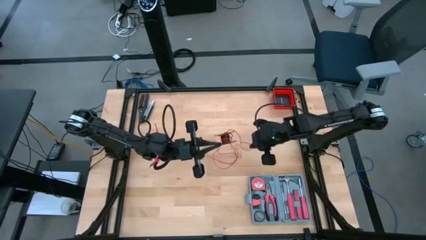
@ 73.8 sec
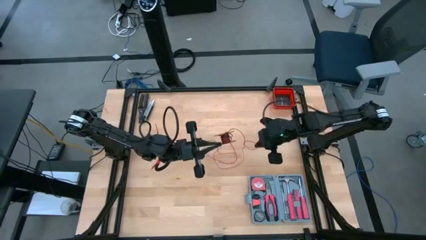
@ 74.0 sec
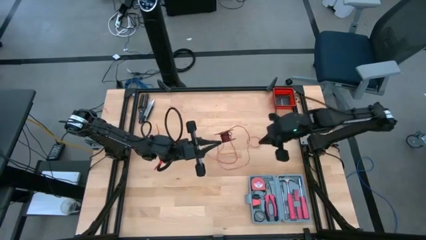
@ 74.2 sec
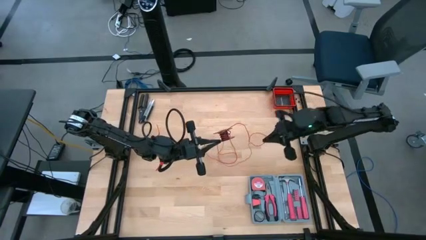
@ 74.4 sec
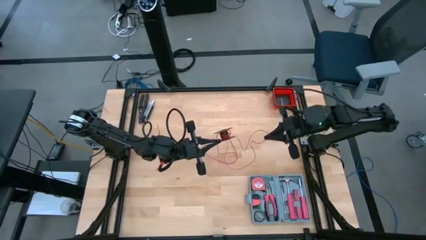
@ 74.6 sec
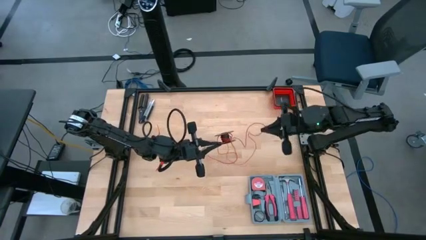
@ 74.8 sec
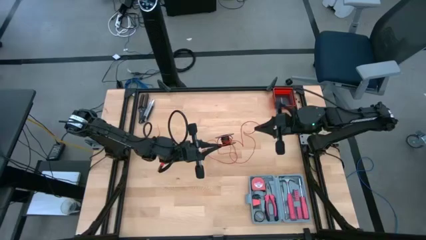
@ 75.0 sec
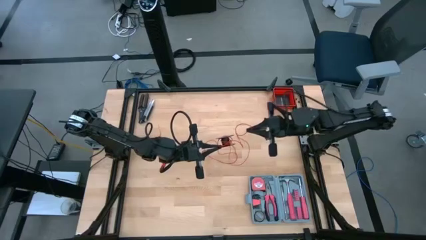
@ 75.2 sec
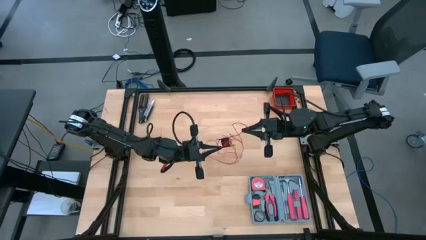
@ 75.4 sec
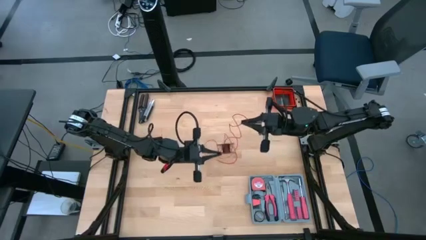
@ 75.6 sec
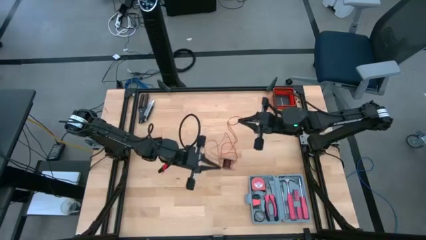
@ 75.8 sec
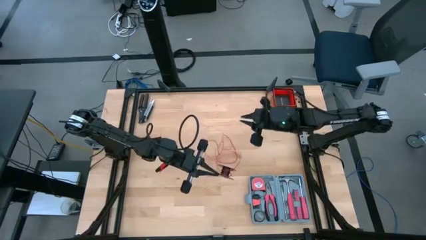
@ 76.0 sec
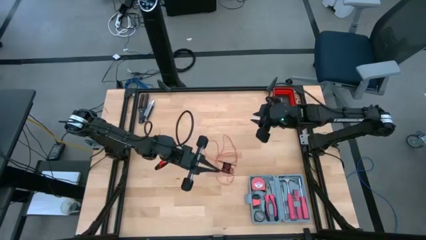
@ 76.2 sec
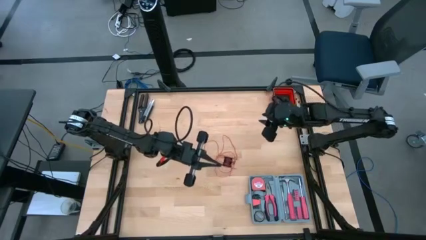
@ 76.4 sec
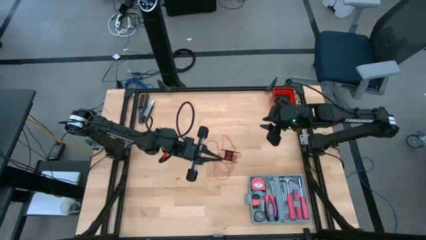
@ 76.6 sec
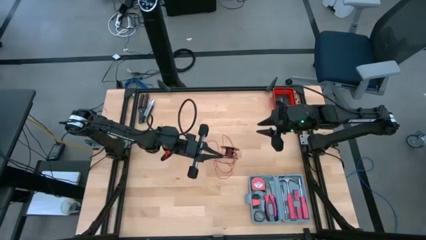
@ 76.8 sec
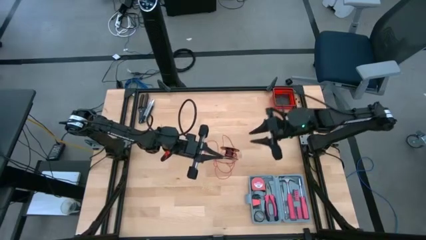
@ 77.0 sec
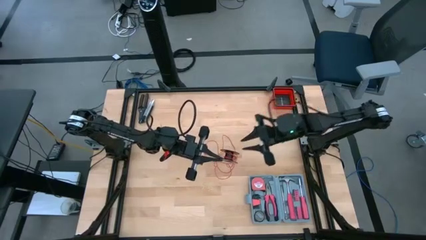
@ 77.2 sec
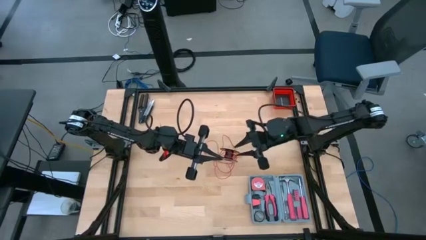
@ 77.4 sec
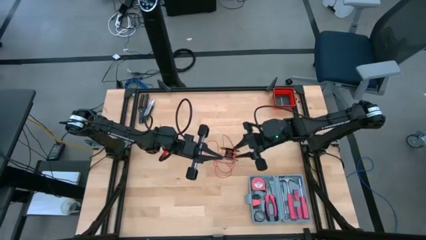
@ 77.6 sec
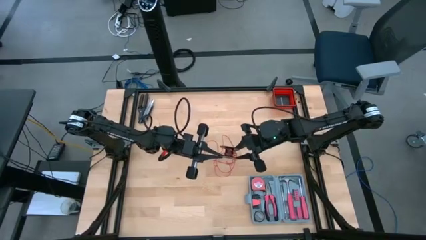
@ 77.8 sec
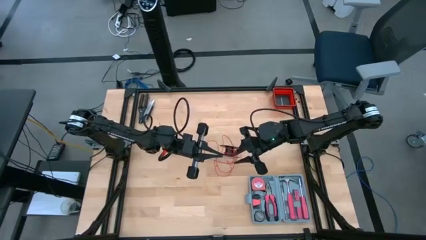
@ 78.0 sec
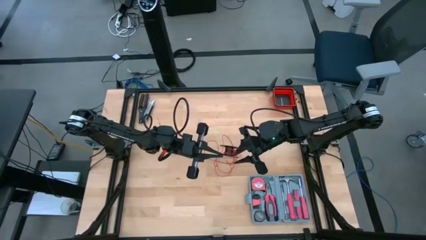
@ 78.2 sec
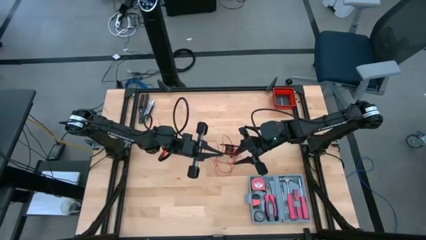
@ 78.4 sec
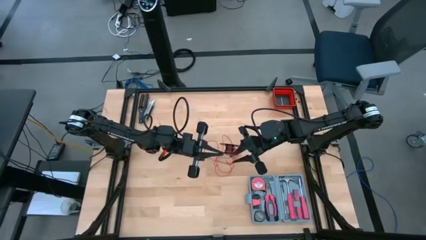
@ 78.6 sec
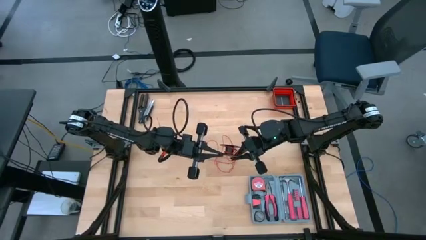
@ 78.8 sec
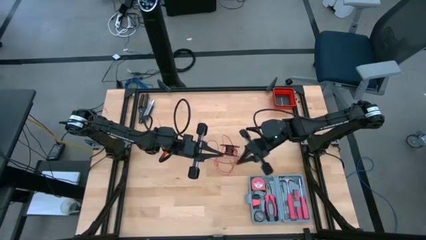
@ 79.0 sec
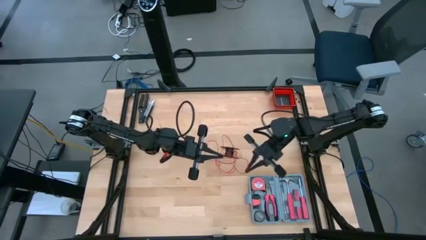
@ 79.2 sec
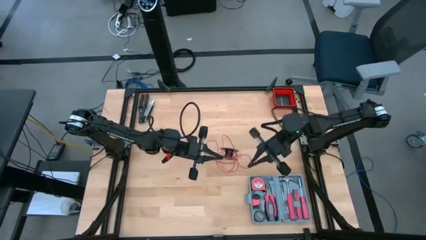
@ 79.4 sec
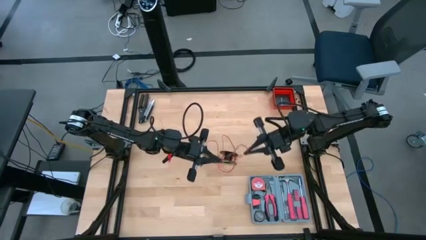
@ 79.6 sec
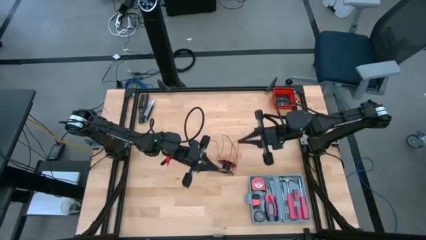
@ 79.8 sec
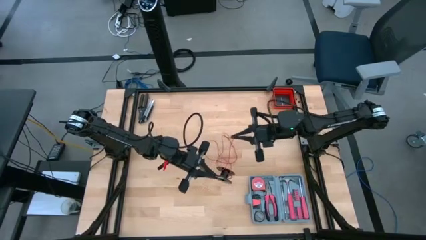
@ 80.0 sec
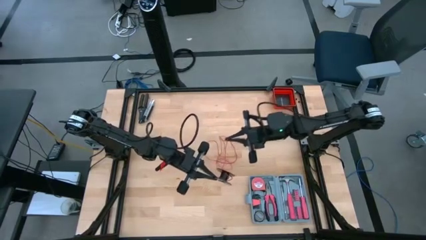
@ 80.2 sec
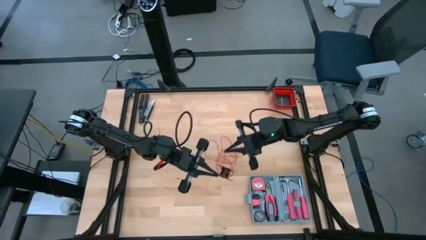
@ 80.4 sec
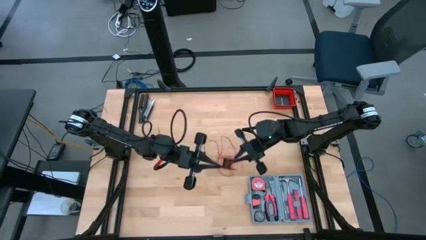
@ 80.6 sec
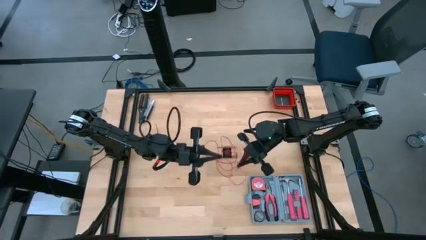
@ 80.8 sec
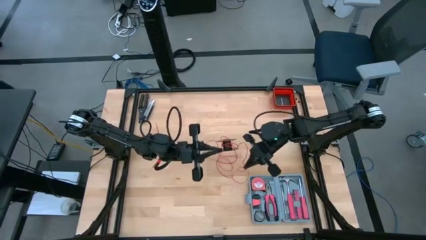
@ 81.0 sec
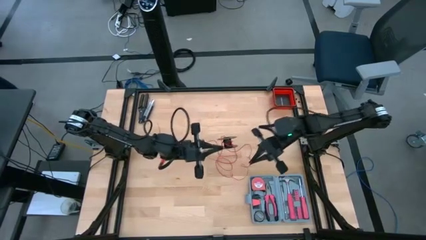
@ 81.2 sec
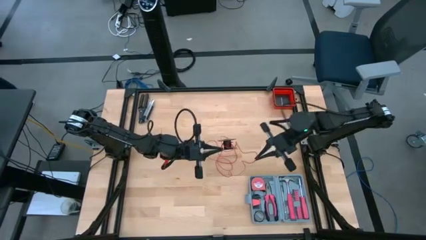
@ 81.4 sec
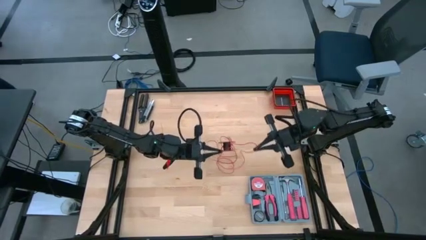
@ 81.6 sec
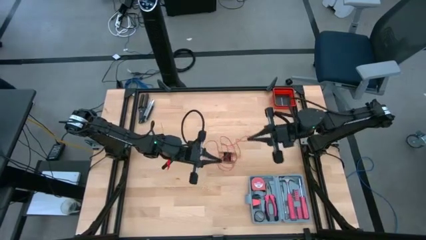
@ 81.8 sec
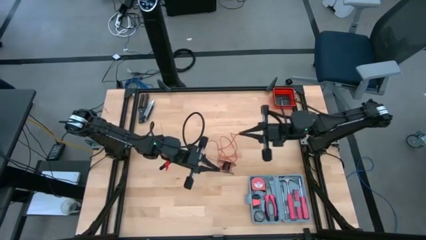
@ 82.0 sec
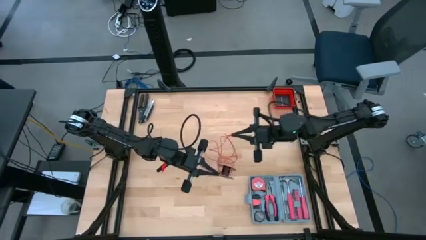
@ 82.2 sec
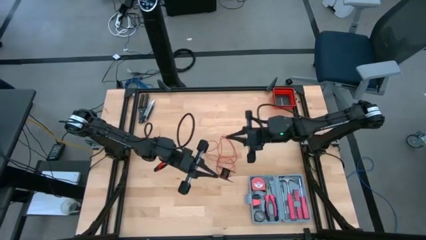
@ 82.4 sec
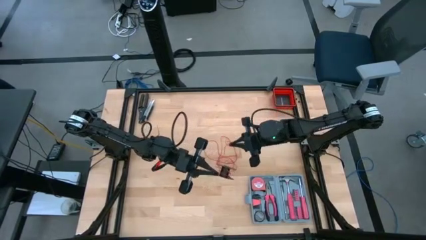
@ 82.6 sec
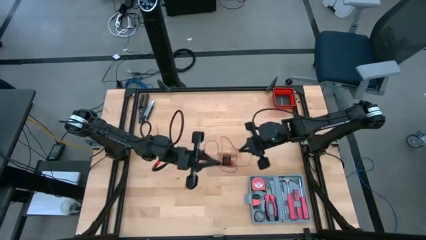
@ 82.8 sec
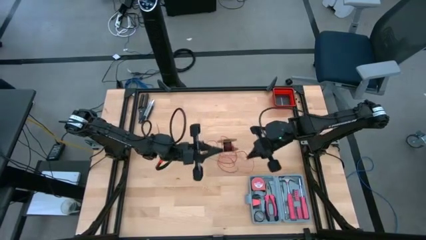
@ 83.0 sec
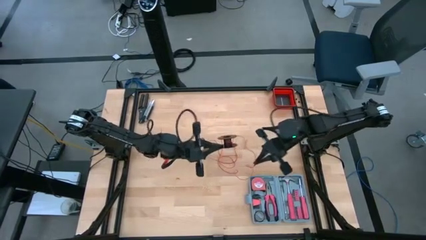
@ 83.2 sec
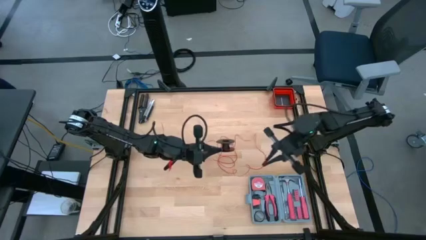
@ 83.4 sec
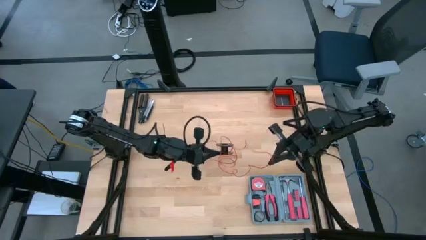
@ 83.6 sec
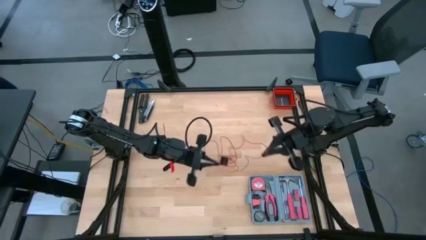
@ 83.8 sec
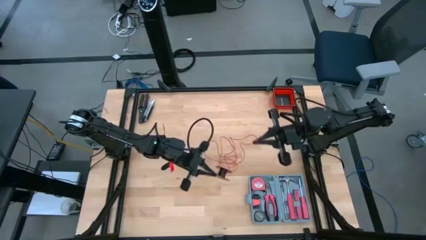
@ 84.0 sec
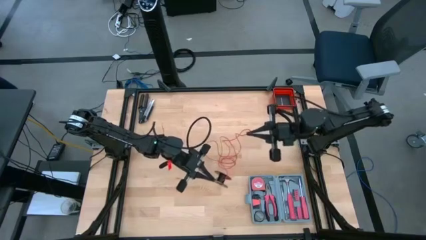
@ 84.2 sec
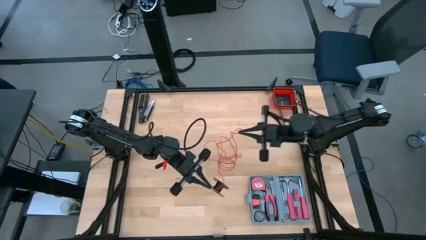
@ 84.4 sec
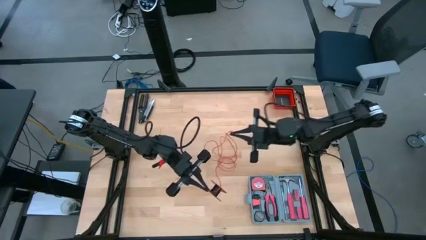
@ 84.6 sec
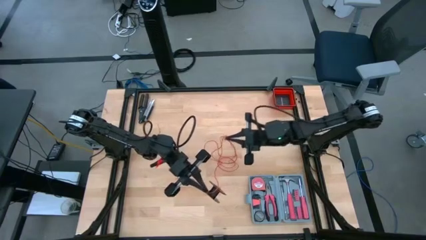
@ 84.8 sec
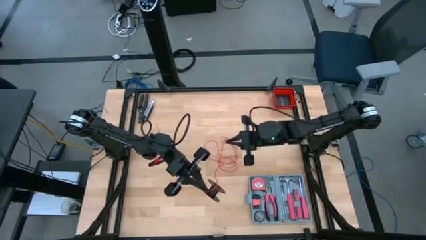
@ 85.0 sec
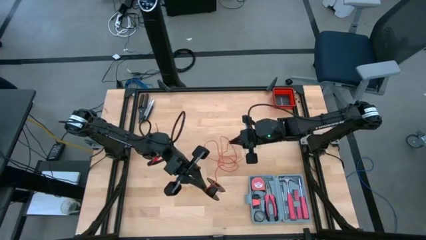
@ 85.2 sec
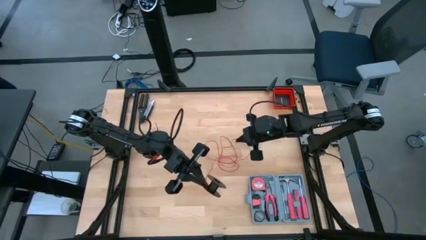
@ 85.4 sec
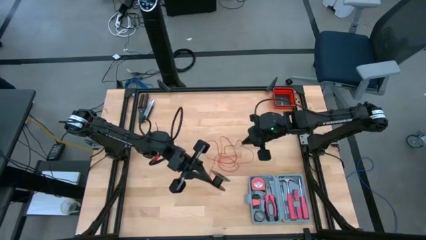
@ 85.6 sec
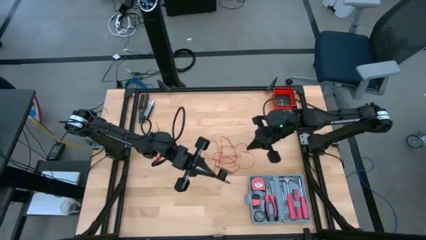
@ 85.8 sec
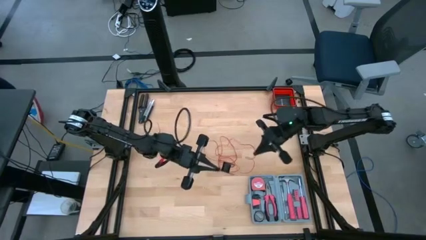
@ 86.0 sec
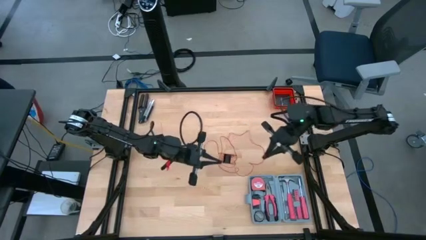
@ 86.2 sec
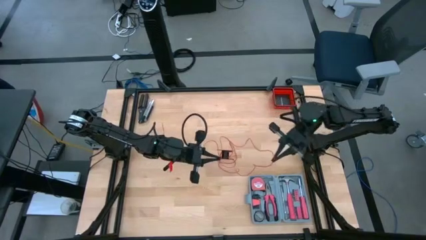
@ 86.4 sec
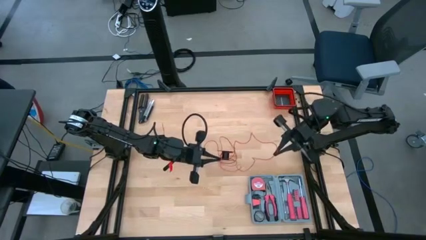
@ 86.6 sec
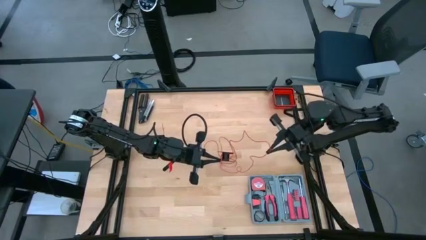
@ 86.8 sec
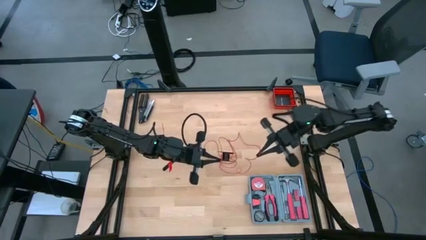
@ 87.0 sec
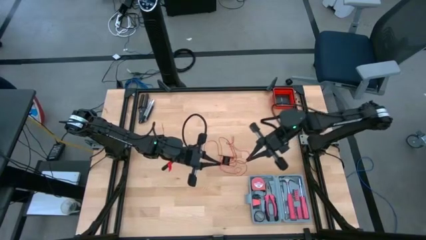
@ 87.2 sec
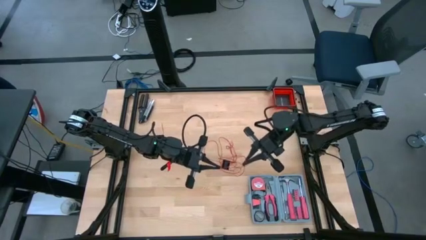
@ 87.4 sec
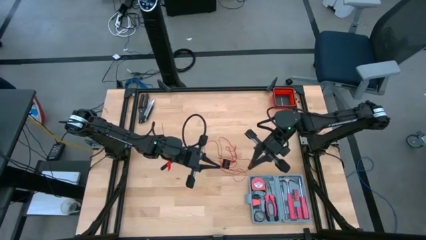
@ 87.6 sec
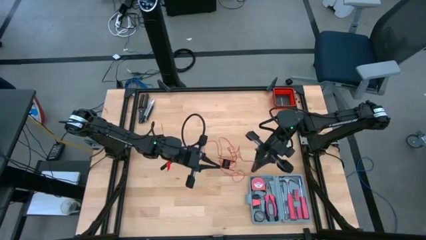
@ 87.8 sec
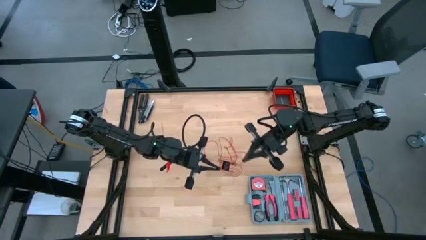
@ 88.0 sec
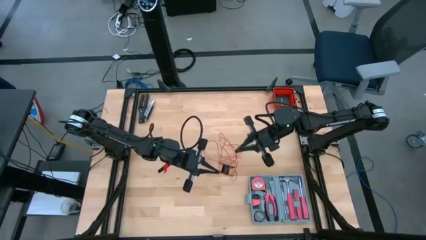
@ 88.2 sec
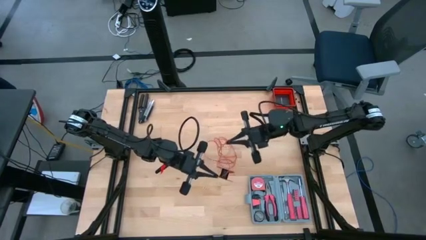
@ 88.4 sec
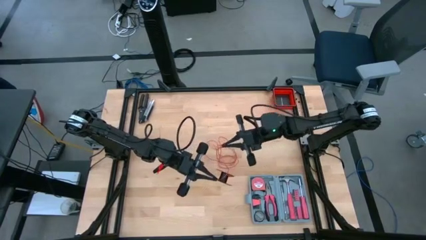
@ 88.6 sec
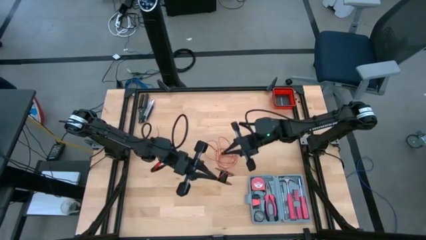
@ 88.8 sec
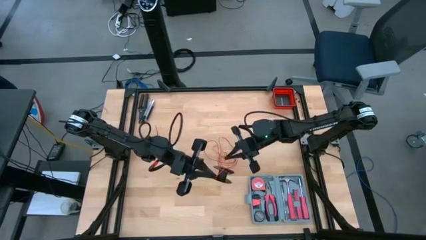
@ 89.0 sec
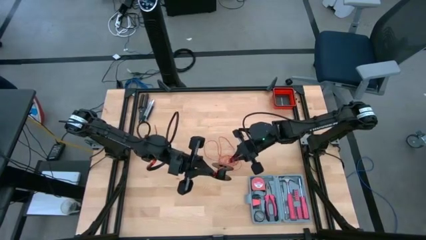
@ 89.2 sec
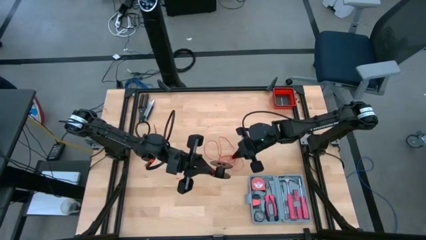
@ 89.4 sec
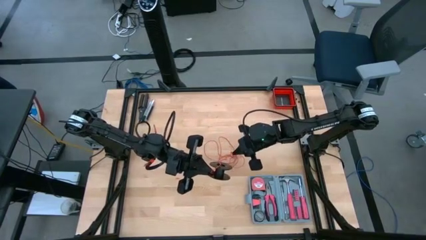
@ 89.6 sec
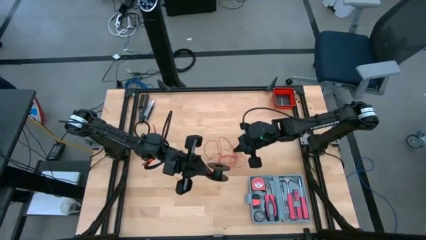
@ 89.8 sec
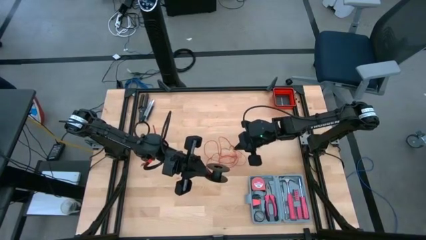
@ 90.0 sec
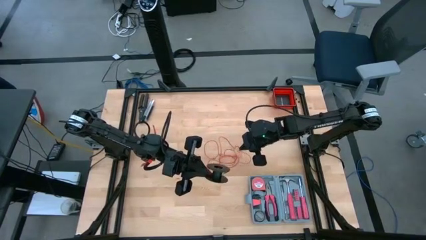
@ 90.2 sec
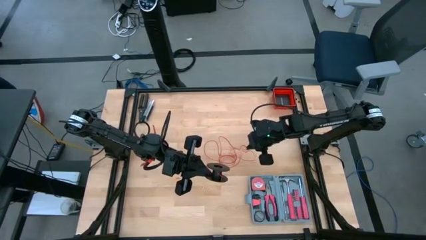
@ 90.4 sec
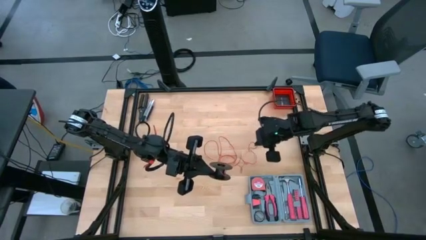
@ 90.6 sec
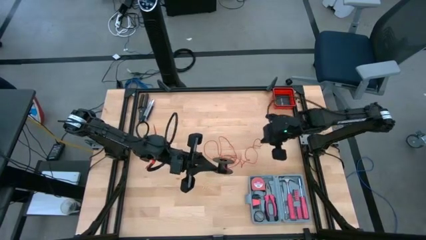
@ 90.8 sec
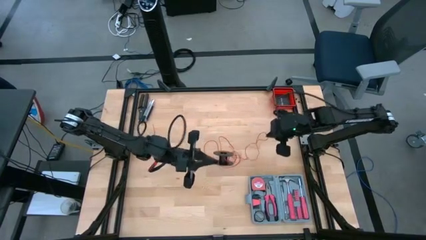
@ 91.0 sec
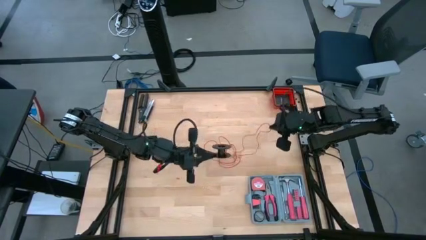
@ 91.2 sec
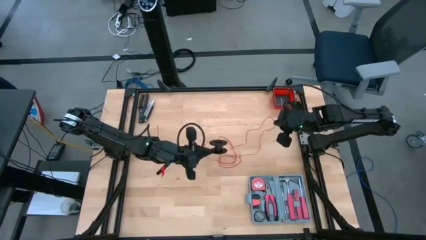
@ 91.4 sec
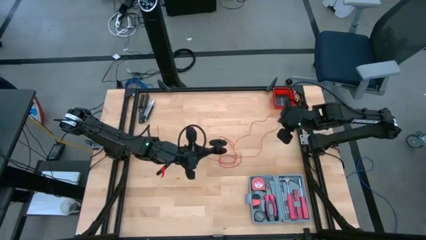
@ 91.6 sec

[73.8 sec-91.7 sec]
Task: Coil cords
Uncoil the wire
